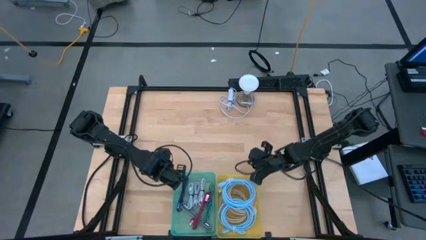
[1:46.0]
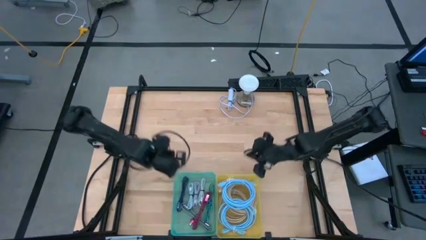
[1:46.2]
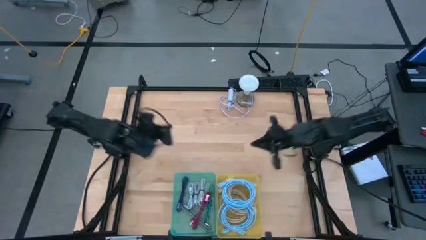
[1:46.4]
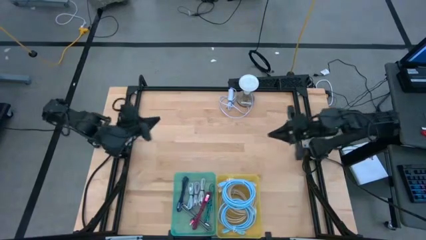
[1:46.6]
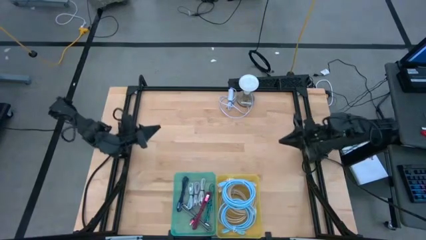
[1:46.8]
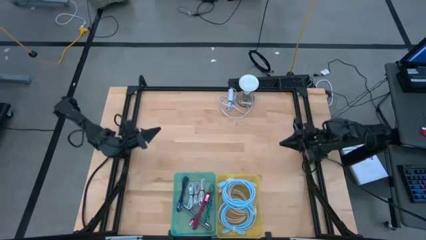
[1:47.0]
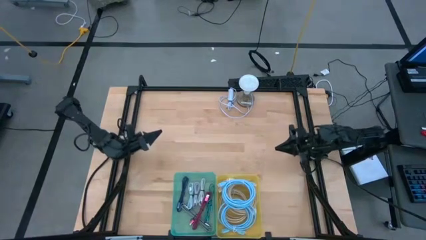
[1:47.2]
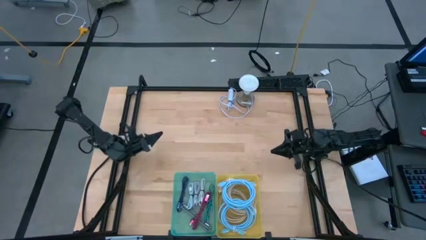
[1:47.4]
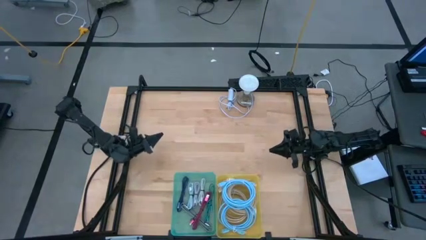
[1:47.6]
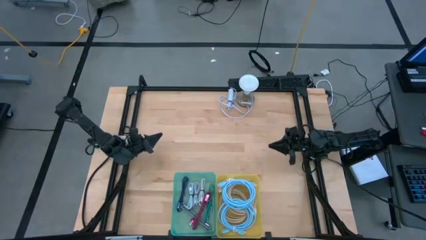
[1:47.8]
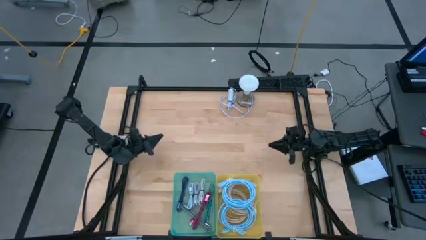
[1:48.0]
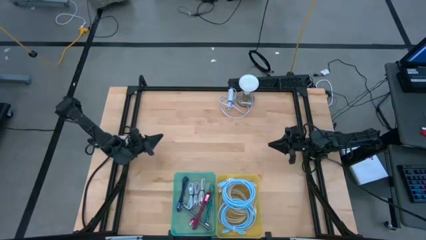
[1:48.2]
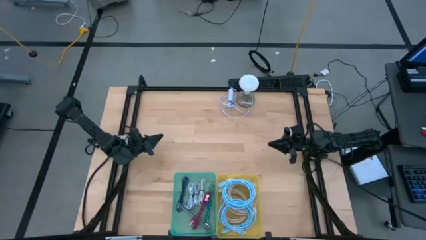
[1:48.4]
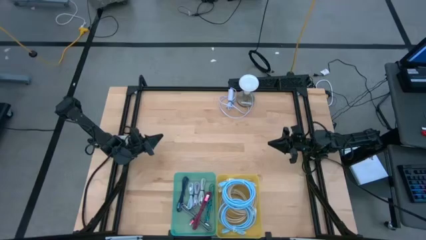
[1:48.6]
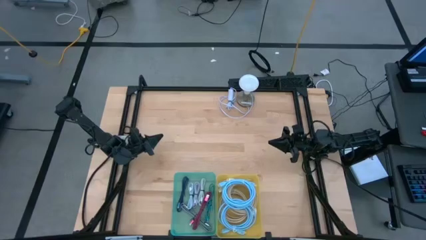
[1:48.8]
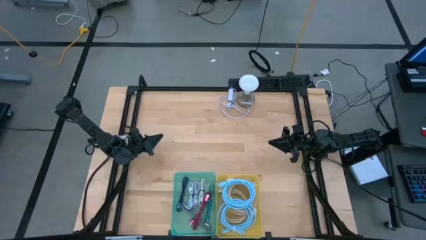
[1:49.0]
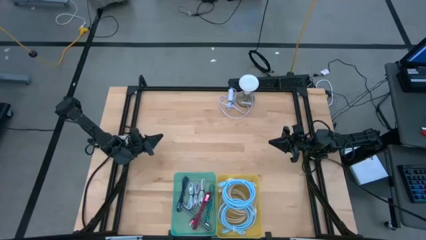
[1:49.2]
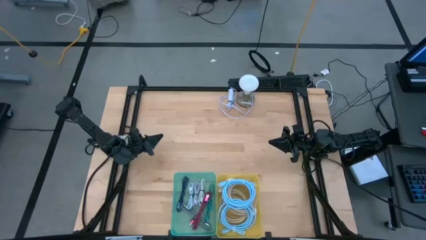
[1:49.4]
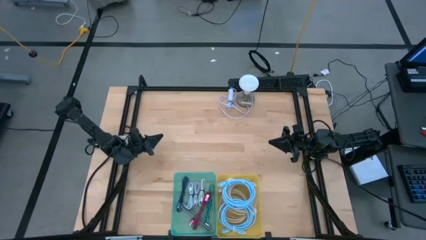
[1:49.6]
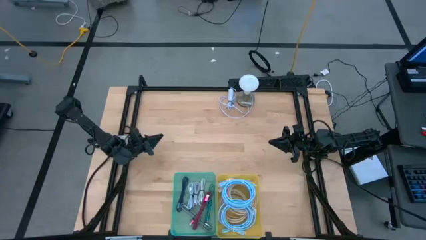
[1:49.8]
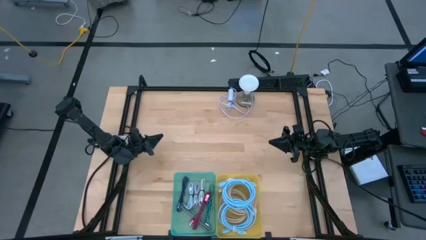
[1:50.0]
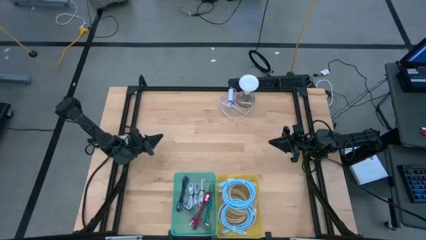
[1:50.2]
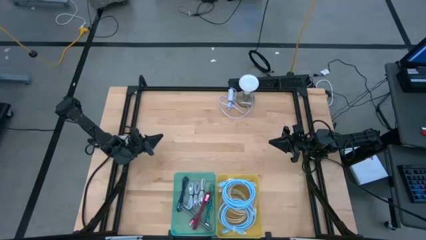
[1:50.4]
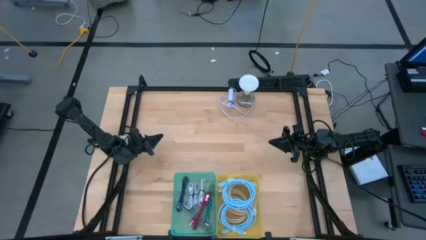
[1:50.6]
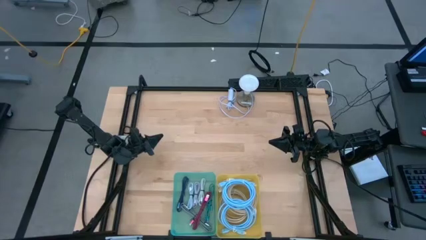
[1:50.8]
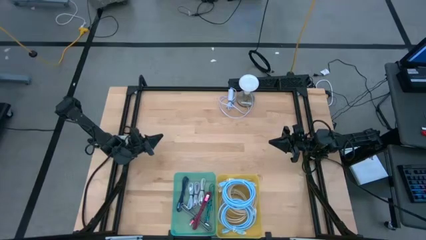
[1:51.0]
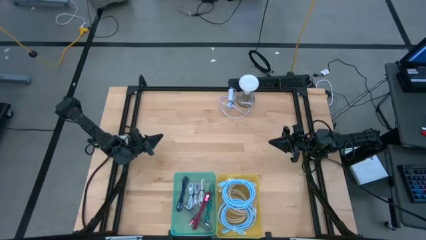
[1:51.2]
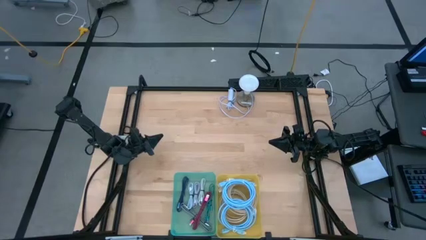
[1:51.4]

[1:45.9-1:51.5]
Task: Pick & Place USB Port
Return to Home Position

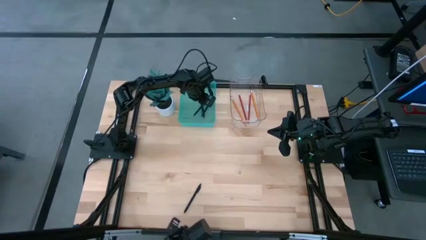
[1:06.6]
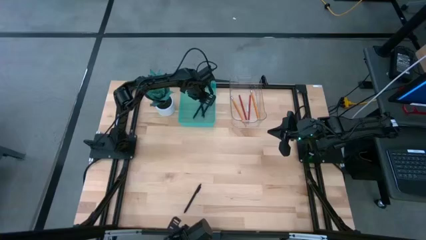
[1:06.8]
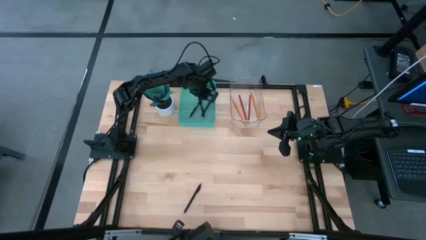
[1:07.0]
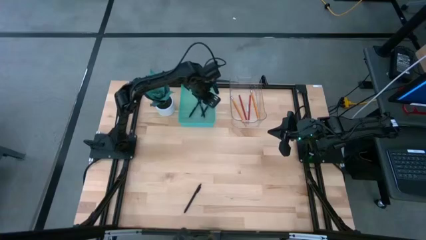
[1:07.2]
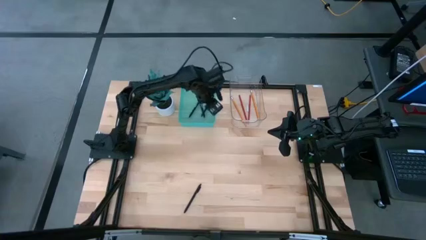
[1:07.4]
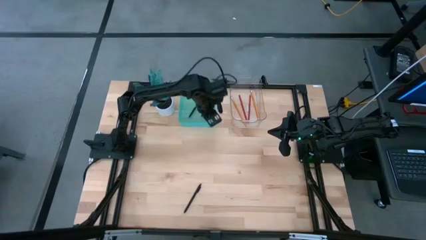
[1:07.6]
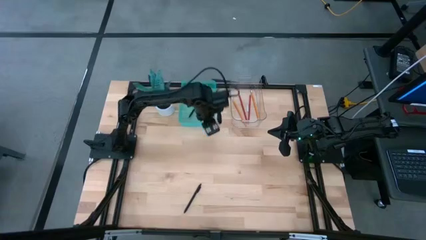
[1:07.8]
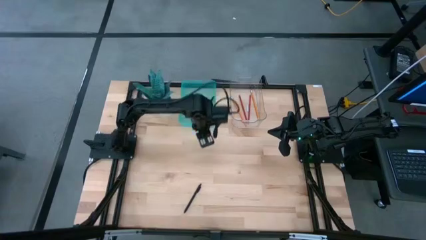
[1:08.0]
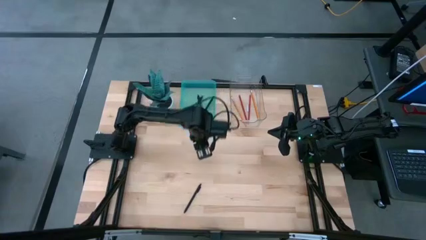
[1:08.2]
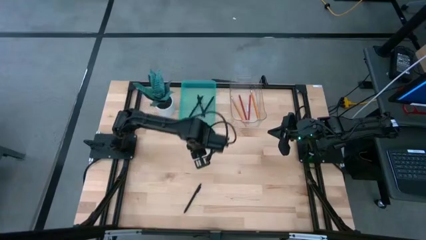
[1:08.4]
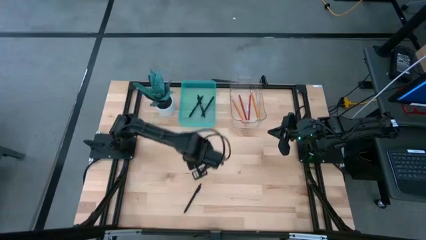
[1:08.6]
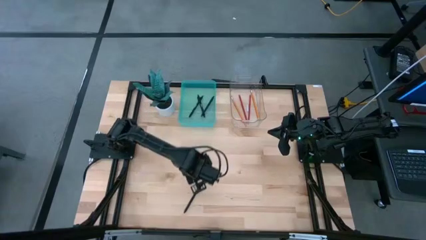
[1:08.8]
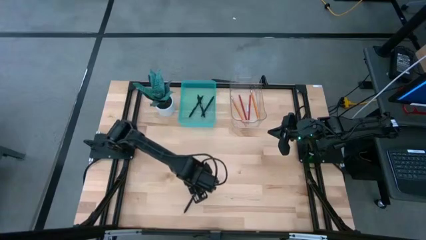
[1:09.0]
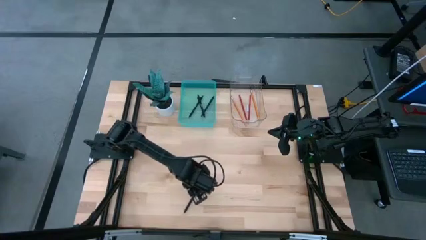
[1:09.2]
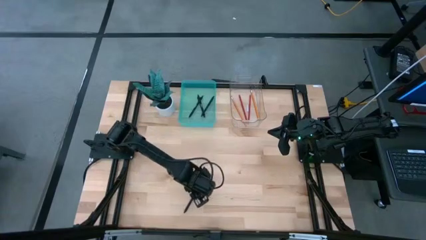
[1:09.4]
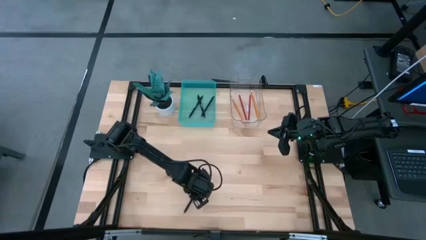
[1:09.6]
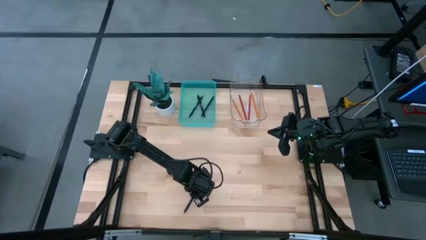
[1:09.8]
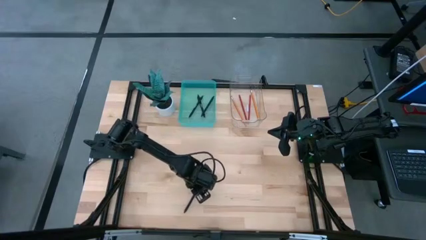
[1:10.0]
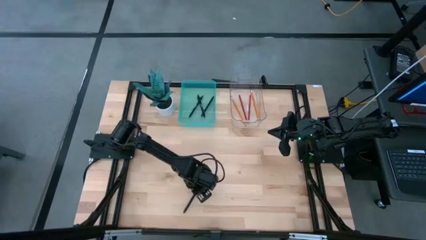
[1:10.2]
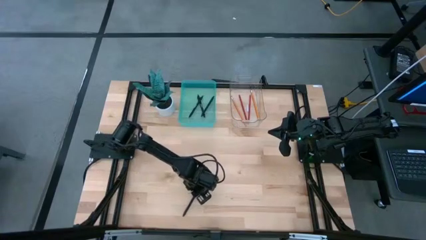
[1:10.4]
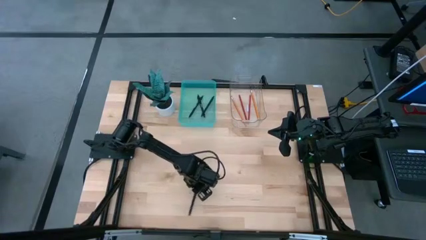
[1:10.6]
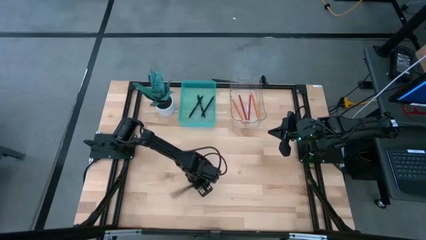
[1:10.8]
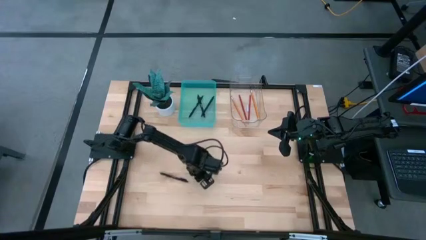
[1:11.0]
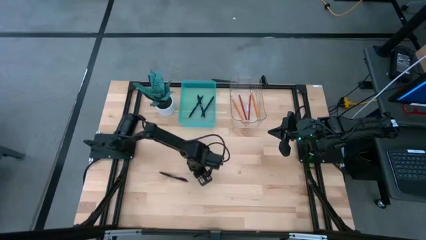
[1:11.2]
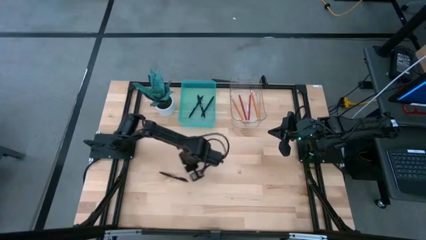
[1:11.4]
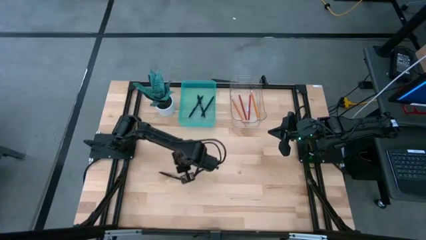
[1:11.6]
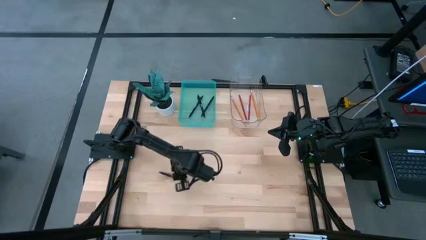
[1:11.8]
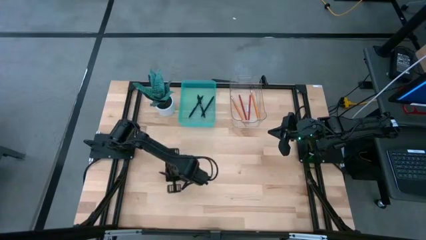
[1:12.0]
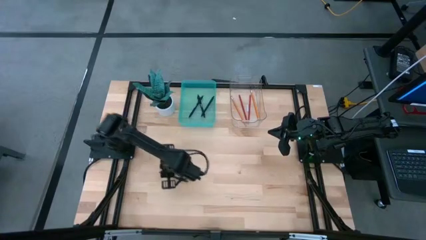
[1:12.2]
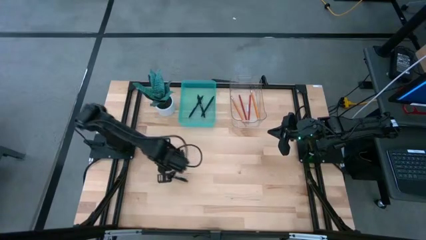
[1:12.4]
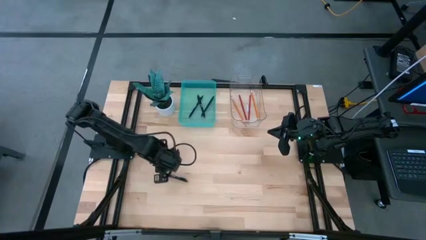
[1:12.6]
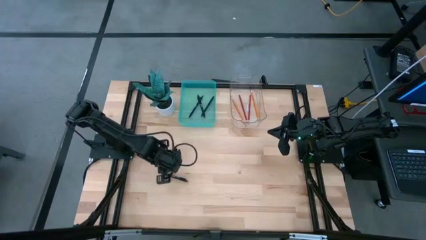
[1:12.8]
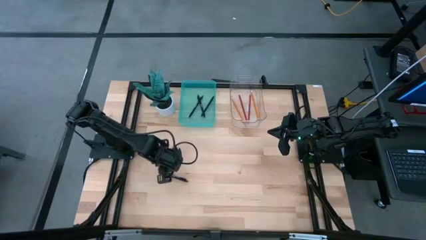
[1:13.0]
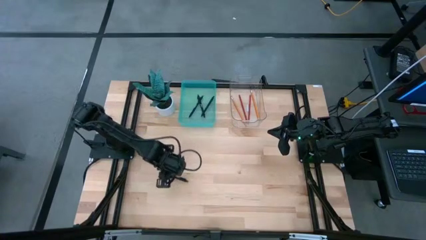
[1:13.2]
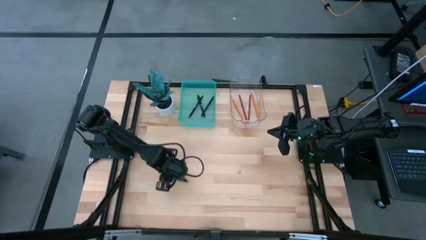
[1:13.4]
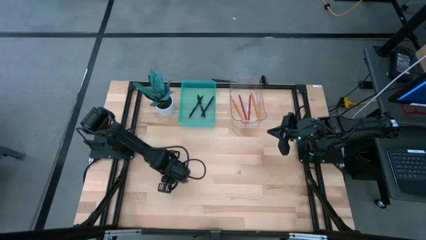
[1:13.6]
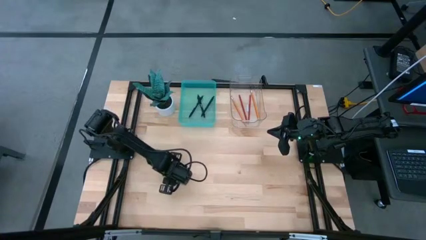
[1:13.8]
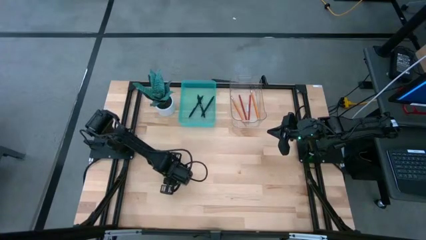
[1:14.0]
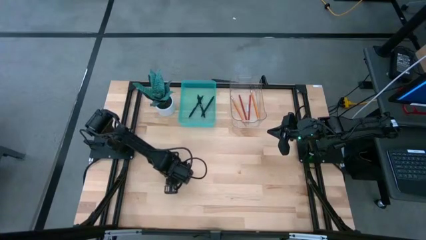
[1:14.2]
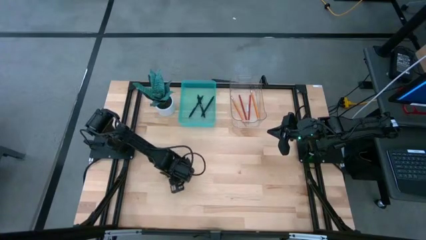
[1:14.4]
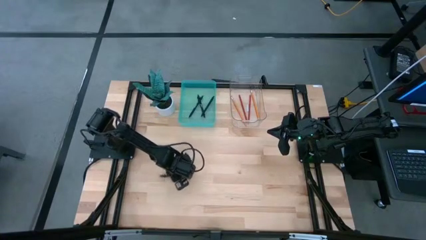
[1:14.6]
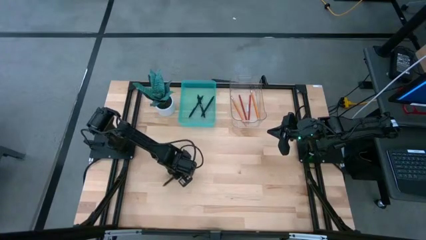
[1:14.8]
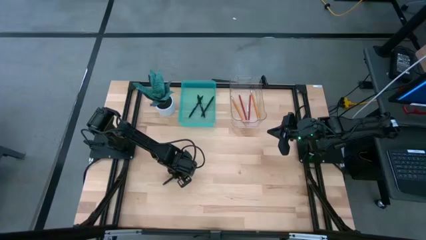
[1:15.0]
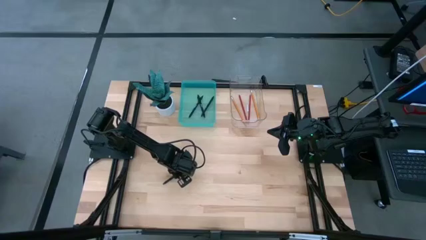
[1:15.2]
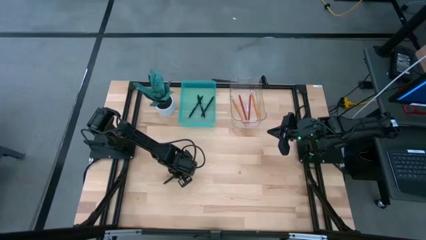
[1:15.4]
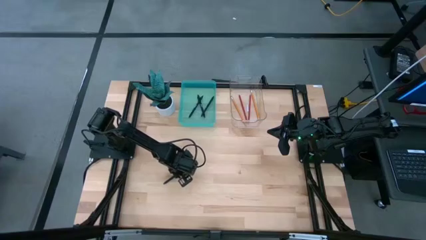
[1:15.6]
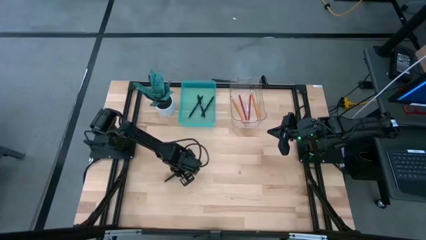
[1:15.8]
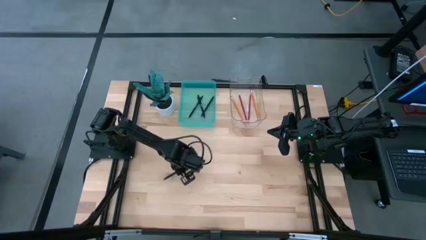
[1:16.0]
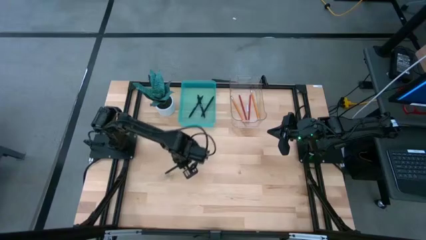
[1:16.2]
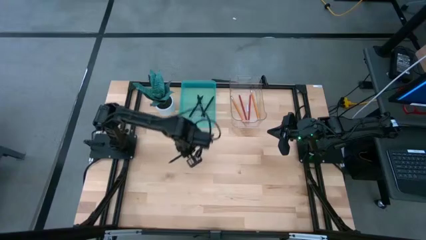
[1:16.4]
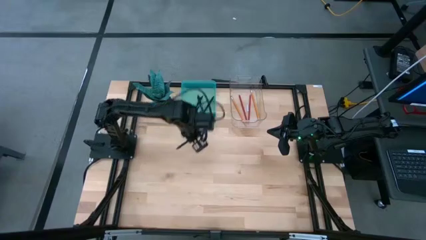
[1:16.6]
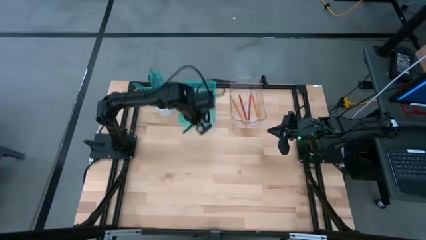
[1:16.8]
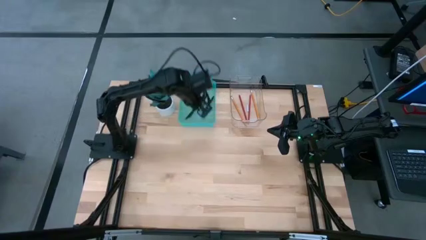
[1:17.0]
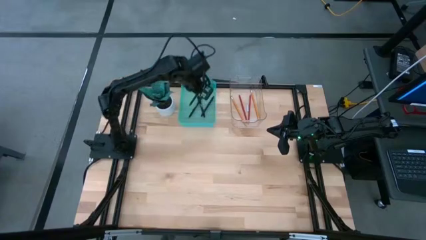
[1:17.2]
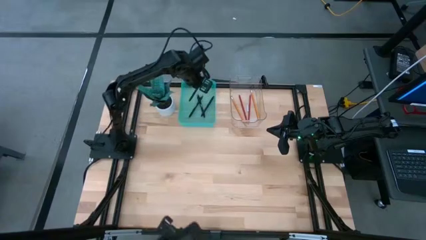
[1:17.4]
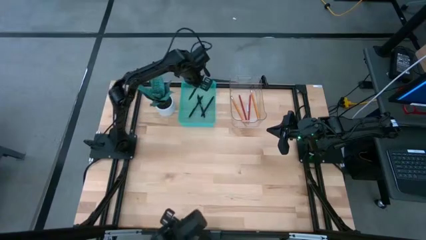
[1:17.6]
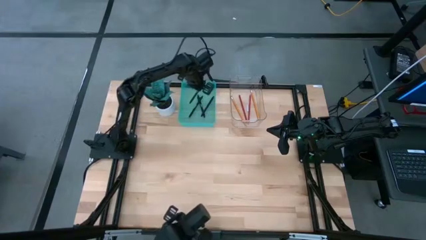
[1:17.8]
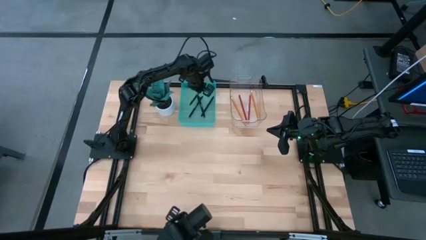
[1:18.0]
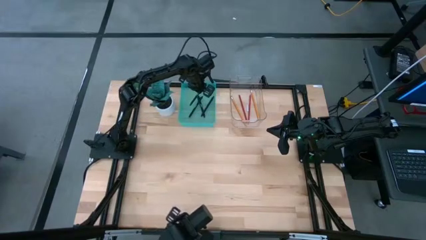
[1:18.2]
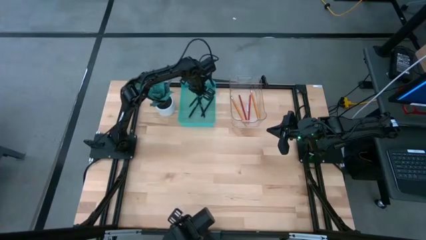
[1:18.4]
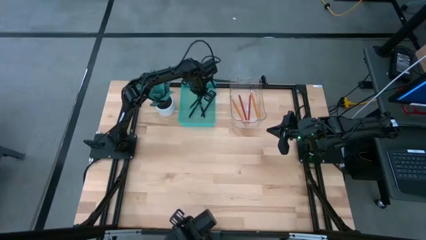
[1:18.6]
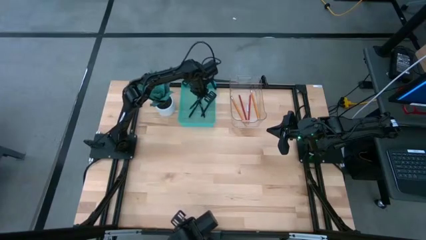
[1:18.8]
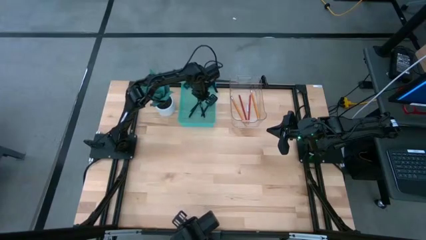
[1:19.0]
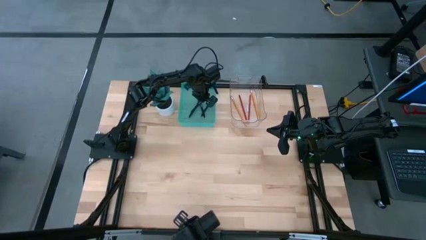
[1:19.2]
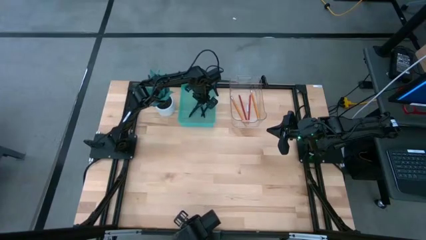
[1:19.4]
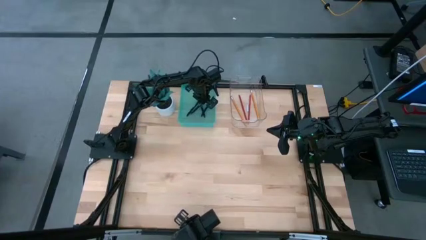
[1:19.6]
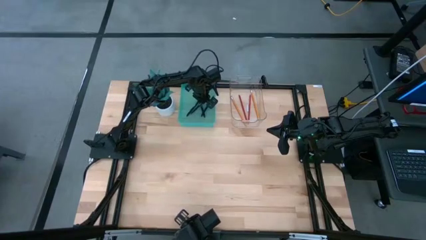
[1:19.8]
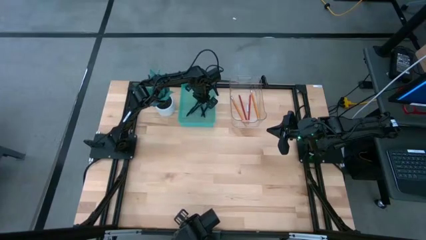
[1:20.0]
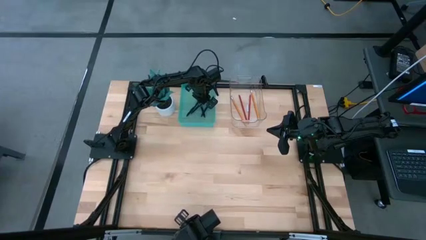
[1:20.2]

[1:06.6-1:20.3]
Task: Sort pens & pencils
Put the black pen into the green bin
